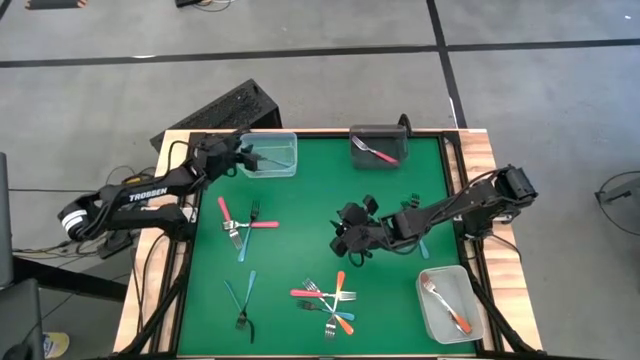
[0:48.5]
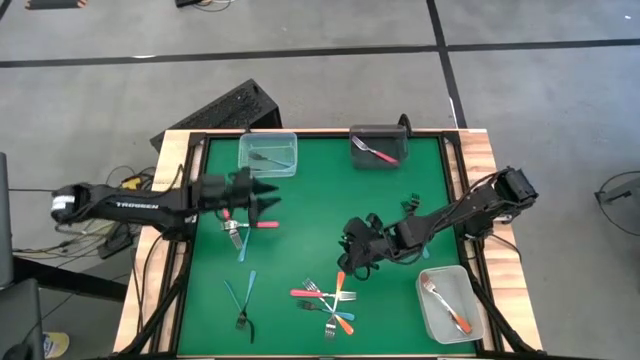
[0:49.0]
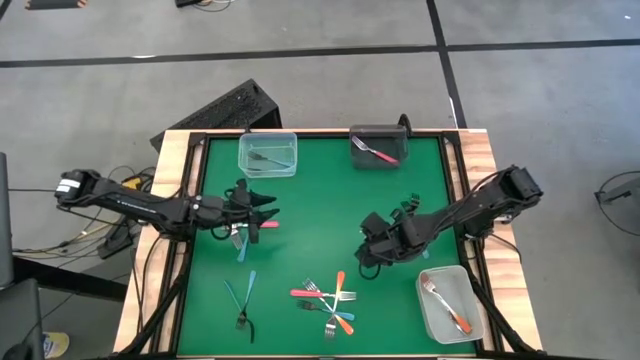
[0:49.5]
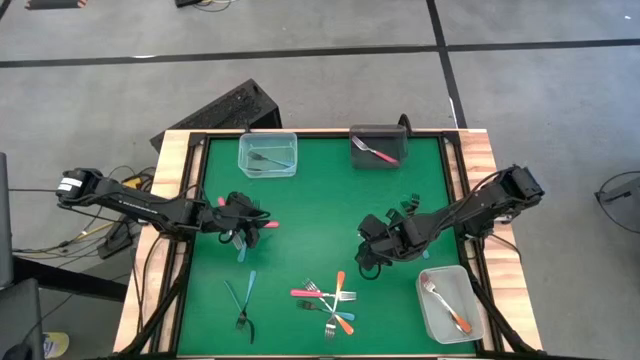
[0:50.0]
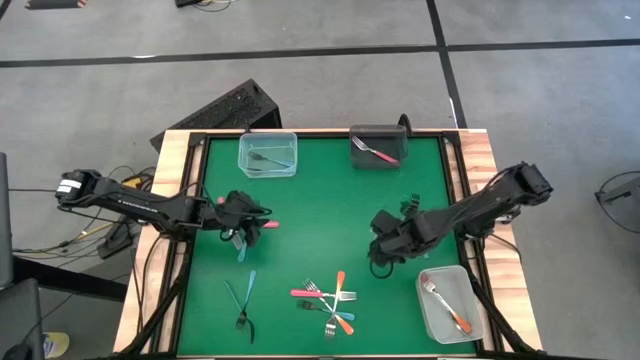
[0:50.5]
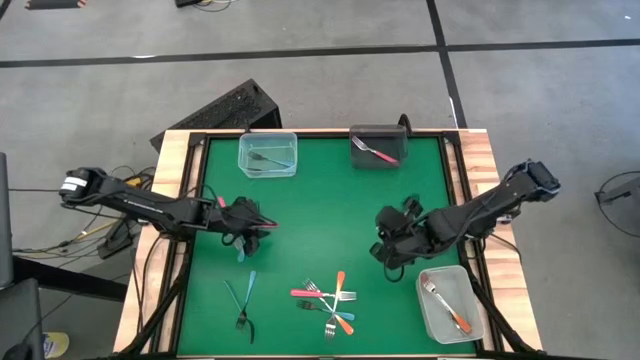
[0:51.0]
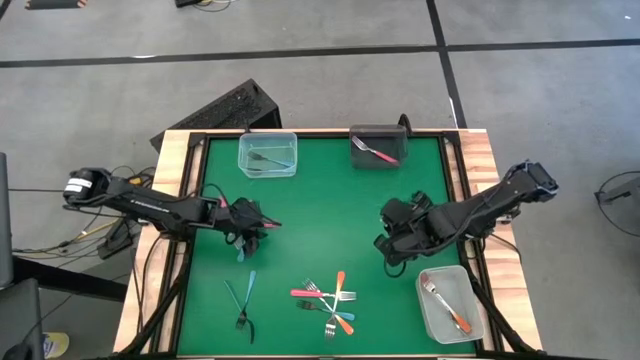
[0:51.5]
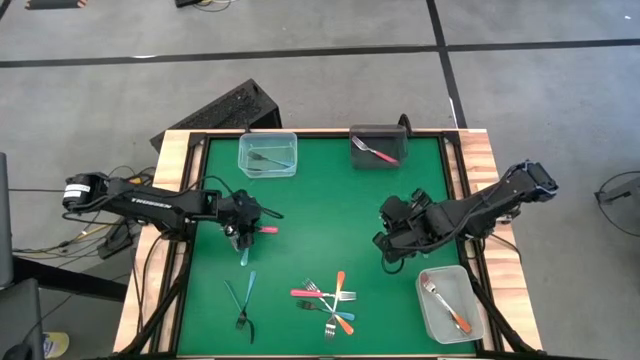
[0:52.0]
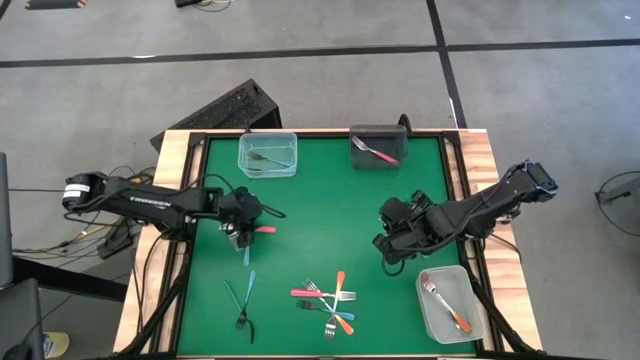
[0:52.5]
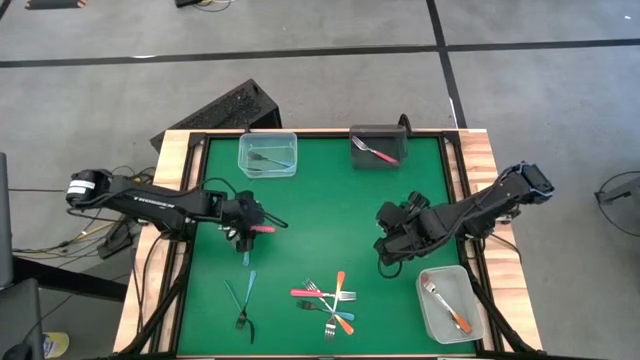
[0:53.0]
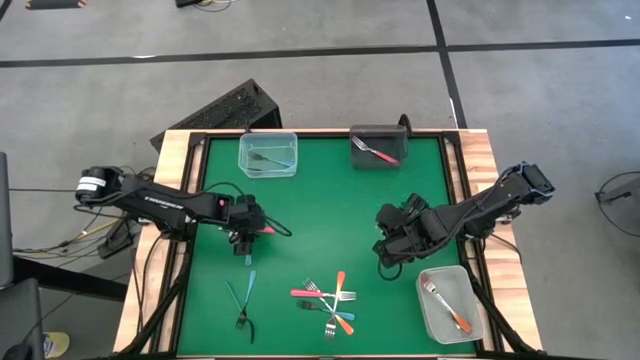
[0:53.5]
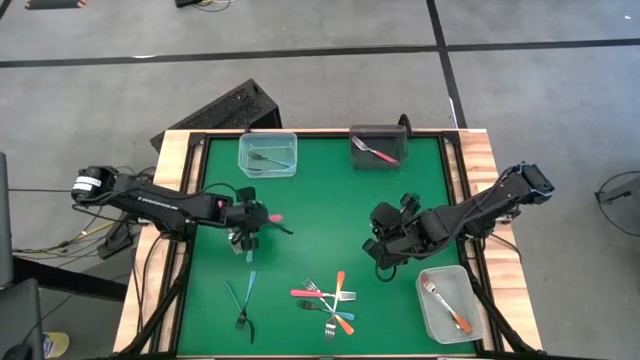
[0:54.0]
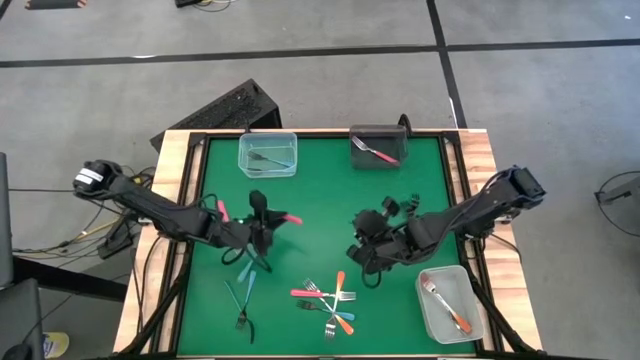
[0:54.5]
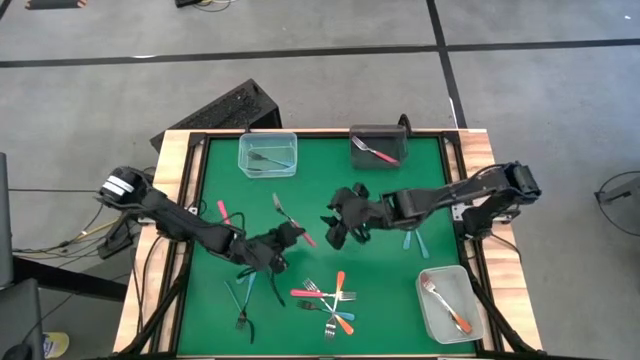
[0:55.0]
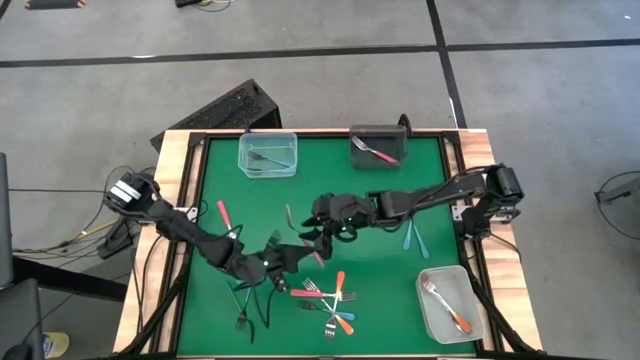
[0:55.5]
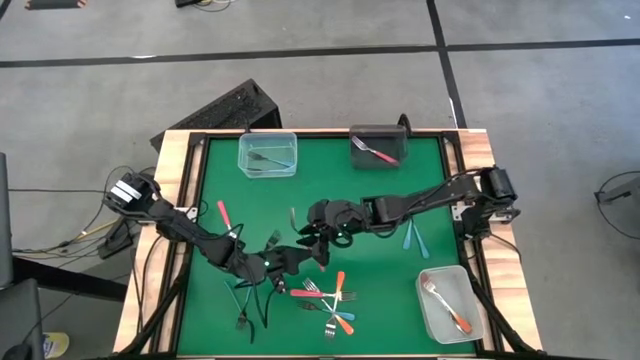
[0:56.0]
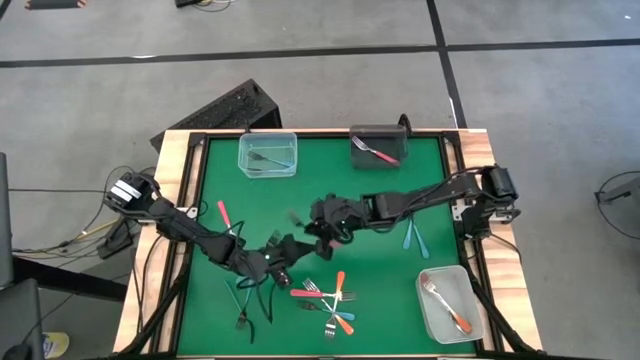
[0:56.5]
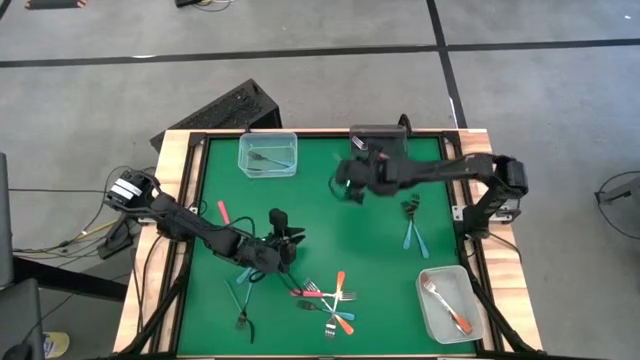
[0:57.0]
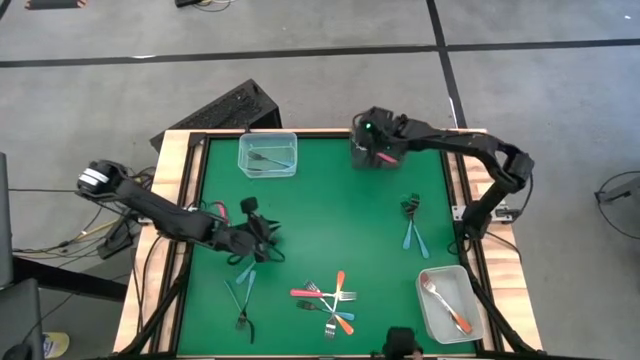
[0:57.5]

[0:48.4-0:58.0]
Task: Sort silverware by color (type)
Put the pink fork into the black bin

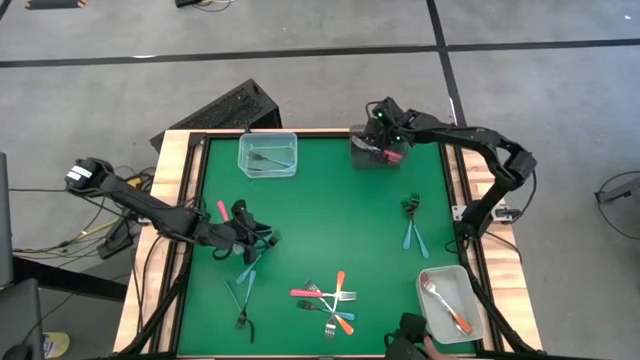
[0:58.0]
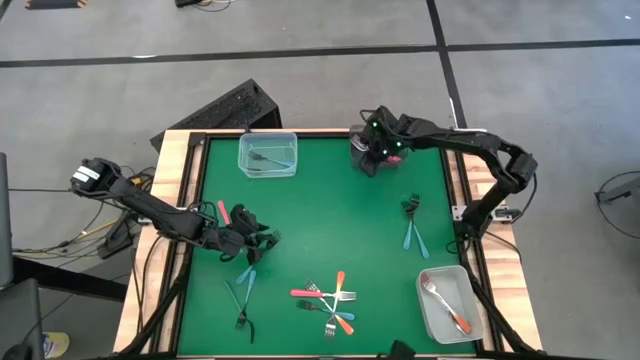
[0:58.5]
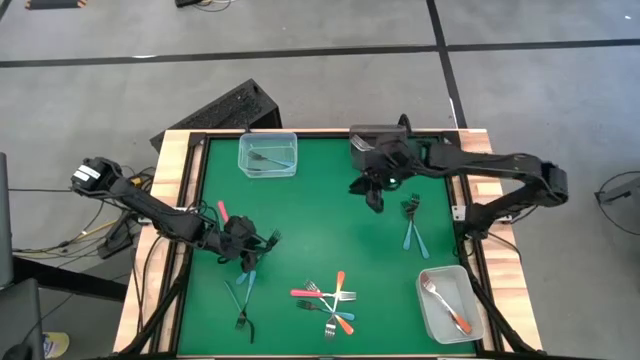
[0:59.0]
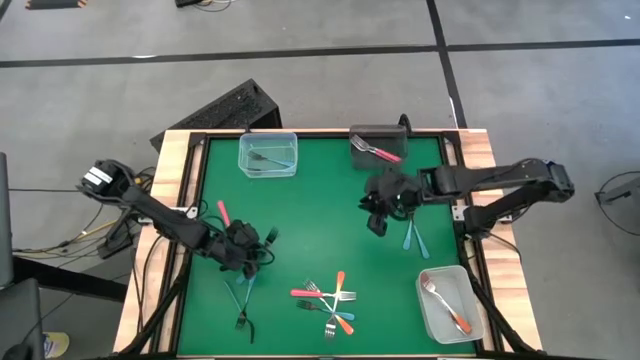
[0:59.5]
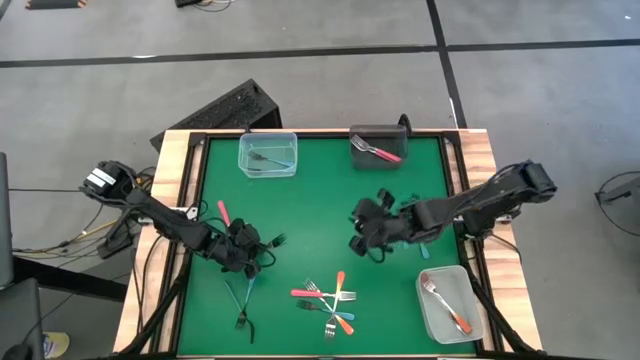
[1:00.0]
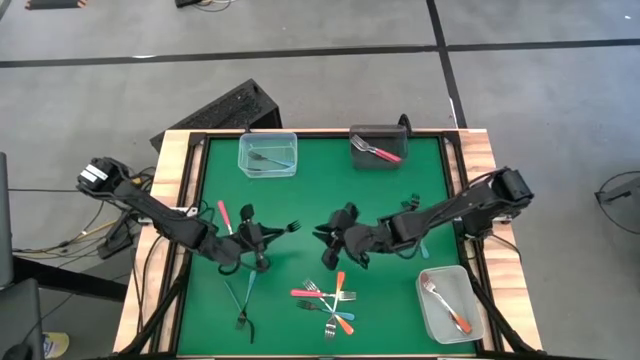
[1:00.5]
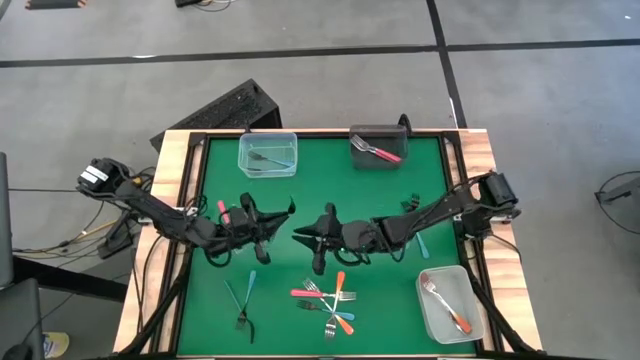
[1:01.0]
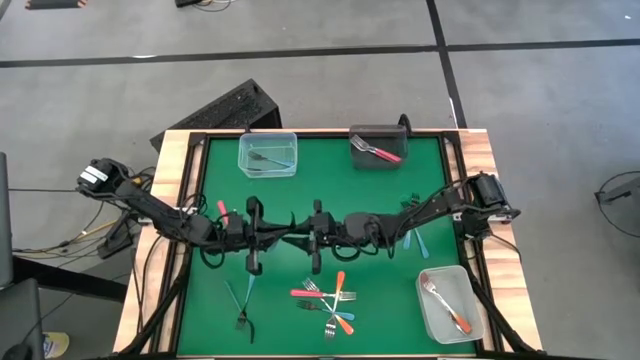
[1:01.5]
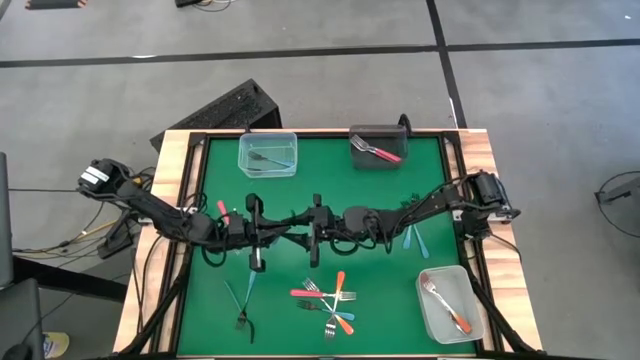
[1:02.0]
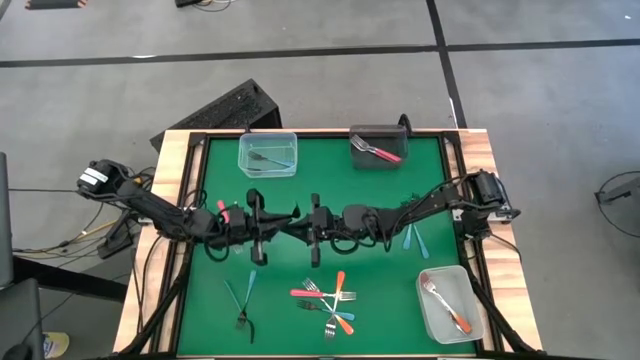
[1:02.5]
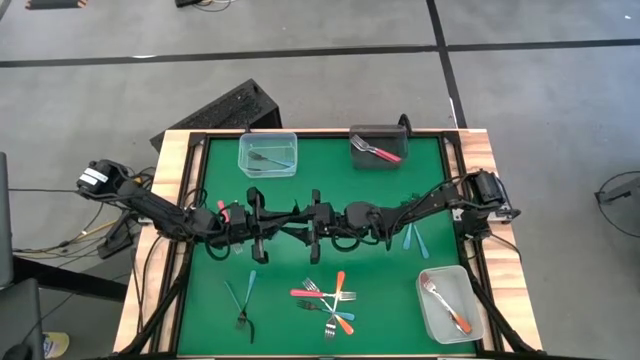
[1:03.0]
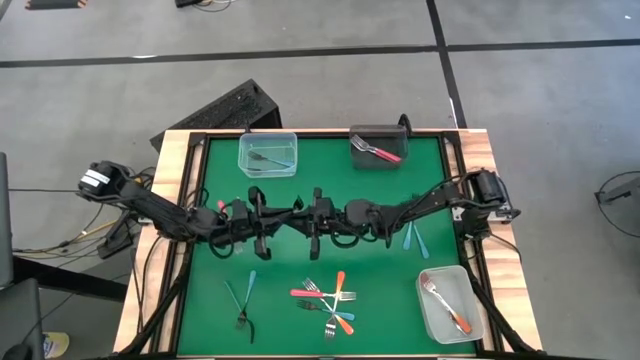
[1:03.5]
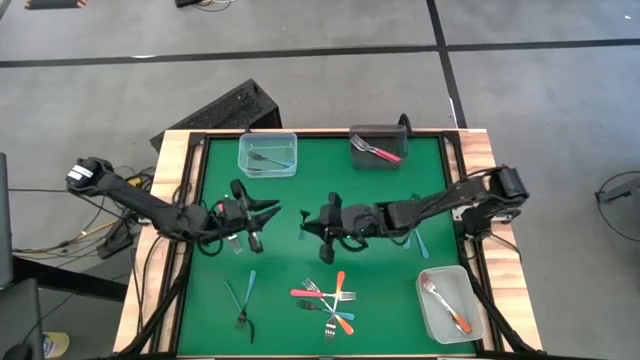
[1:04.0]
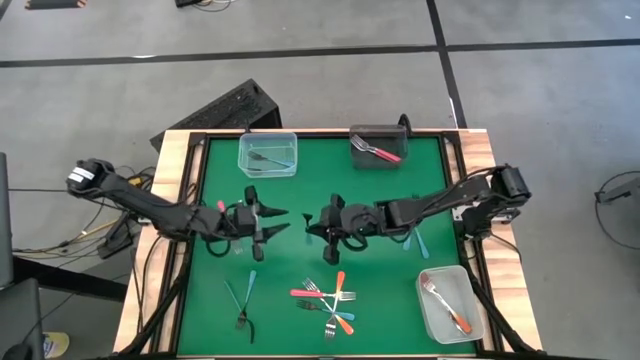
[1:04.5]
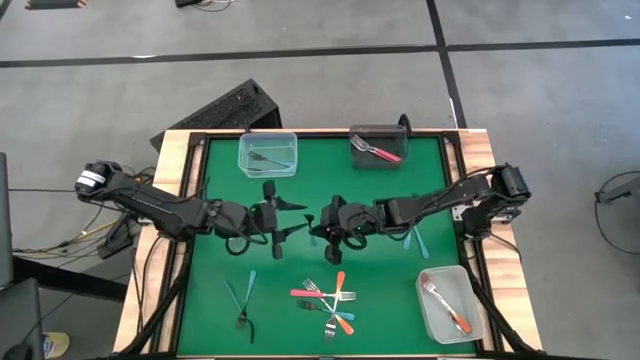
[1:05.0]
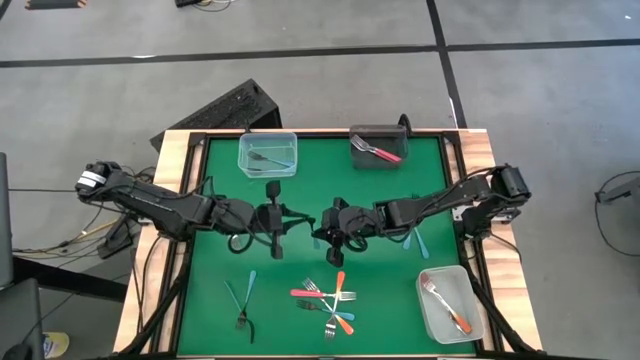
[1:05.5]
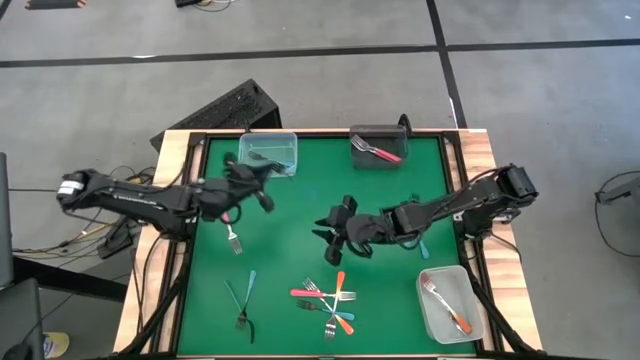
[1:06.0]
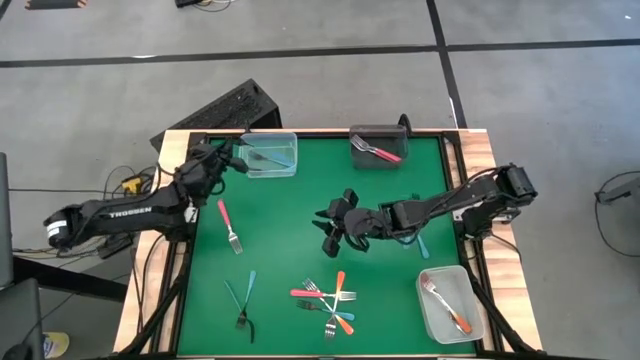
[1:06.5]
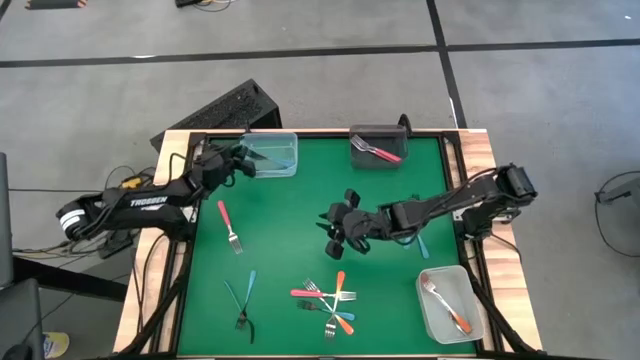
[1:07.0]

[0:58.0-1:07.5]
Put the black fork into the transparent bin

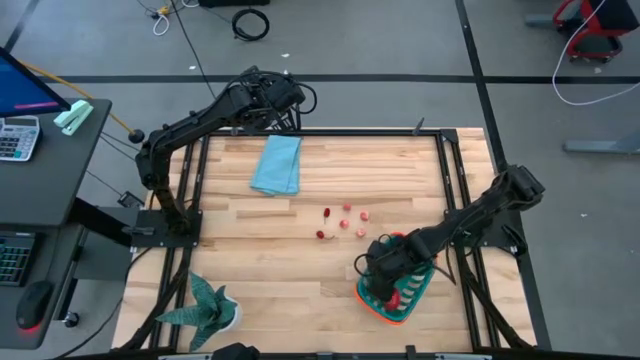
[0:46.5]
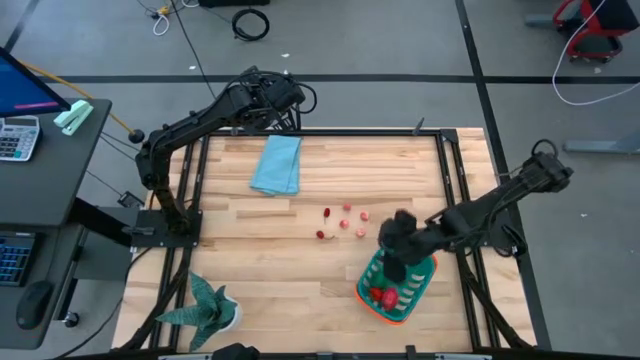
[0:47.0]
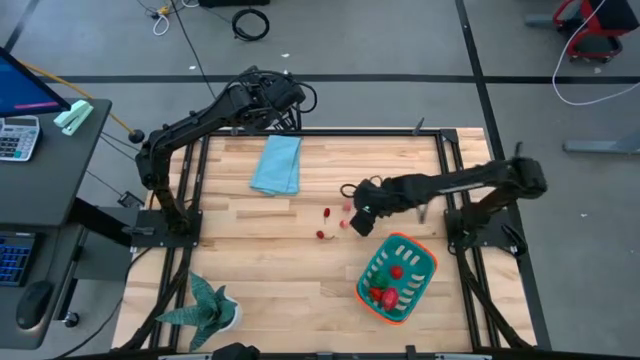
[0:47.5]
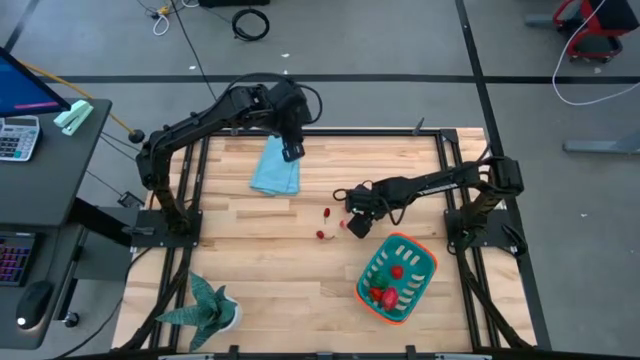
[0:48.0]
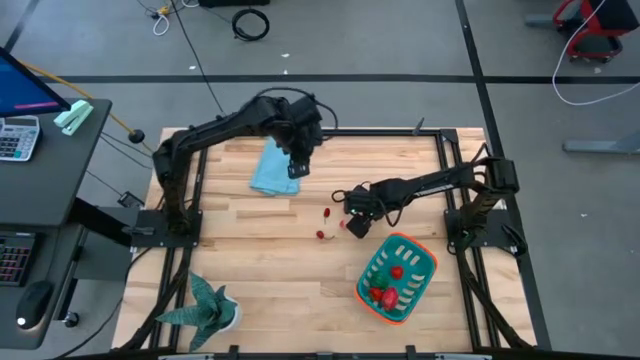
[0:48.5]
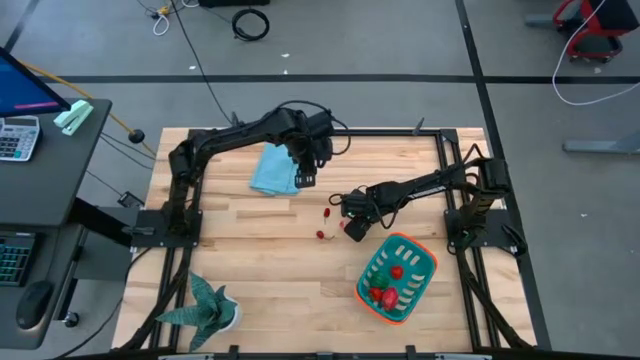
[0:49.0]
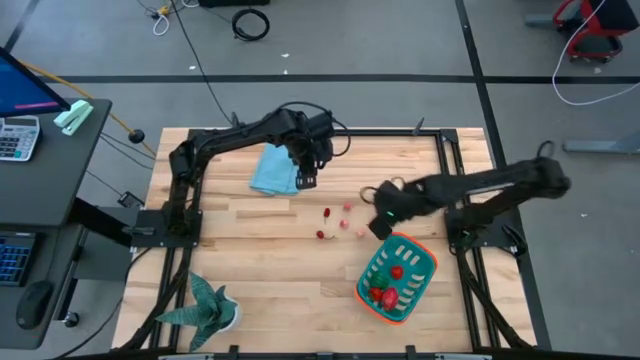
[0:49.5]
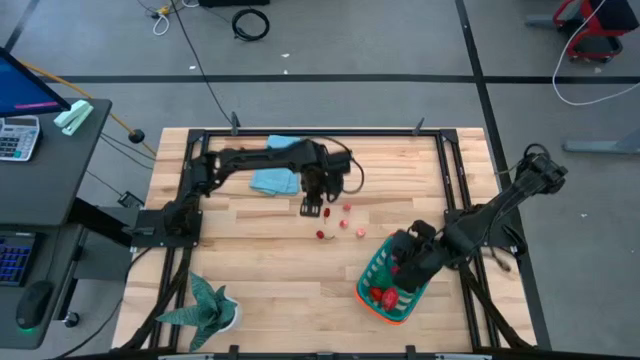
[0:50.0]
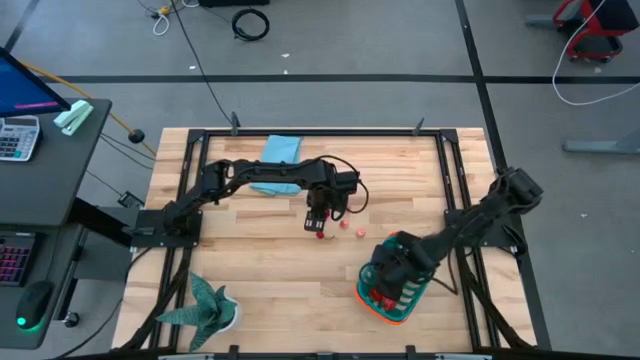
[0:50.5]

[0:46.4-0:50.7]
Task: Pick and placing Produce into tupperware
Put the pink peach into the blue basket
